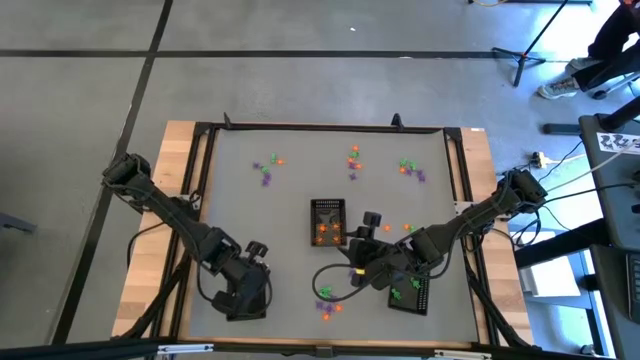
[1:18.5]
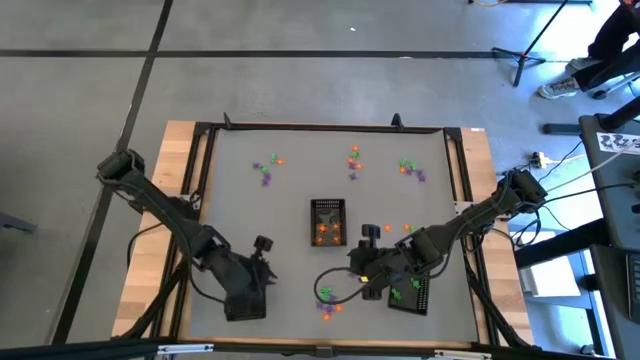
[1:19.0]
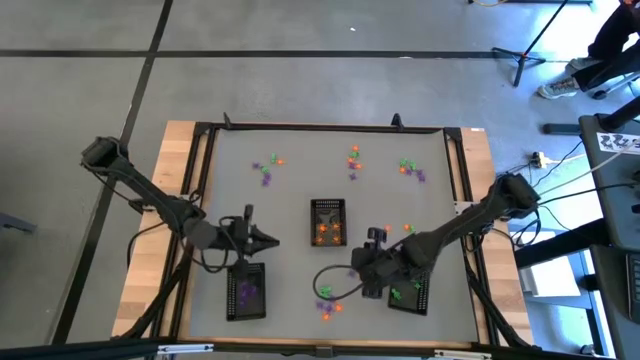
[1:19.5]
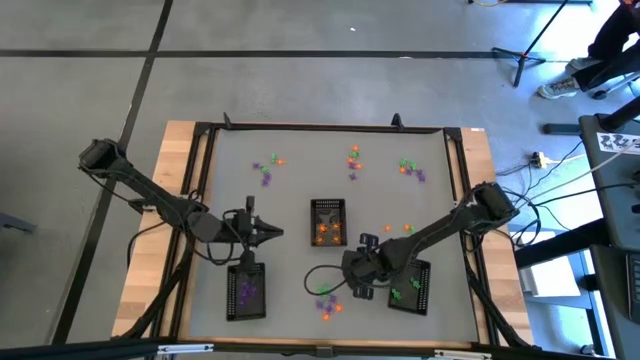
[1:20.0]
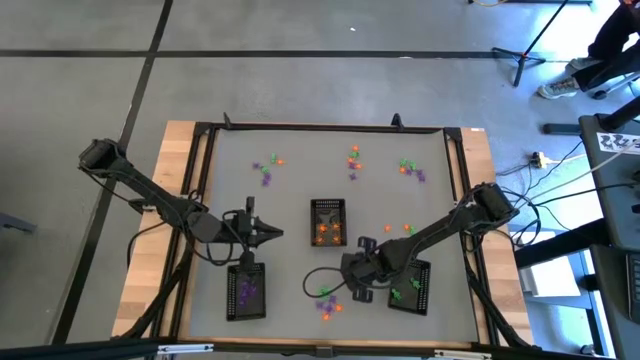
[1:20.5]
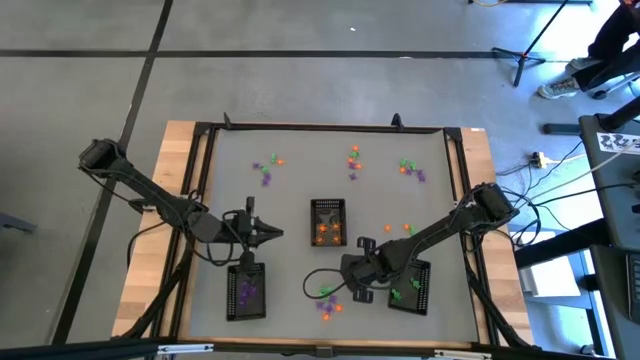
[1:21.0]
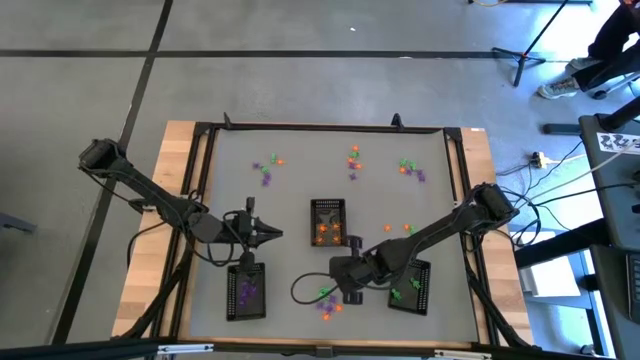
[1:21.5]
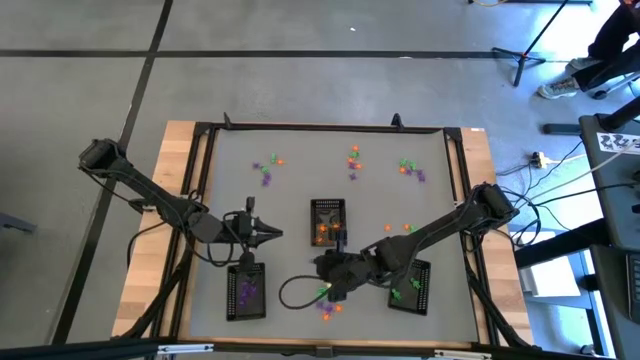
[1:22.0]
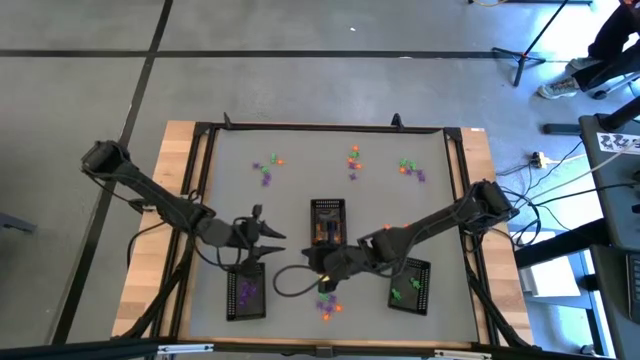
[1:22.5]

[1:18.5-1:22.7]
Task: Sort Halloween decoration
Put the violet spider toy into the bottom left black bin

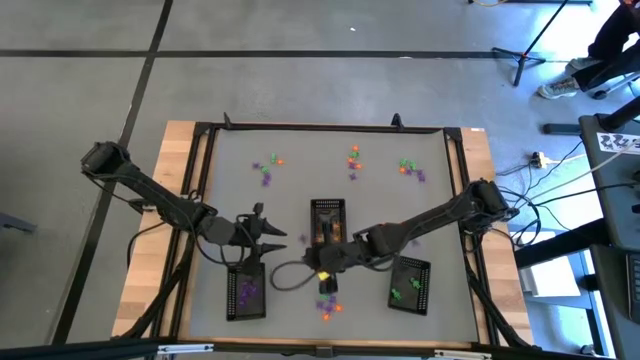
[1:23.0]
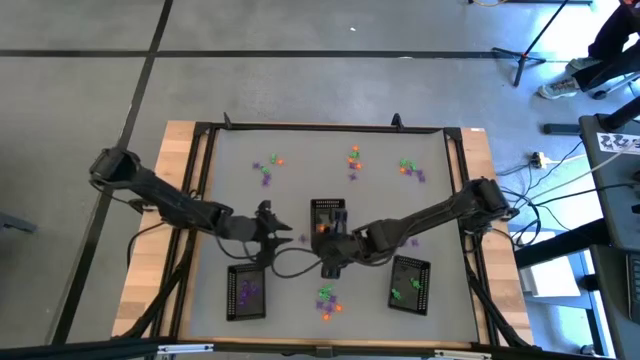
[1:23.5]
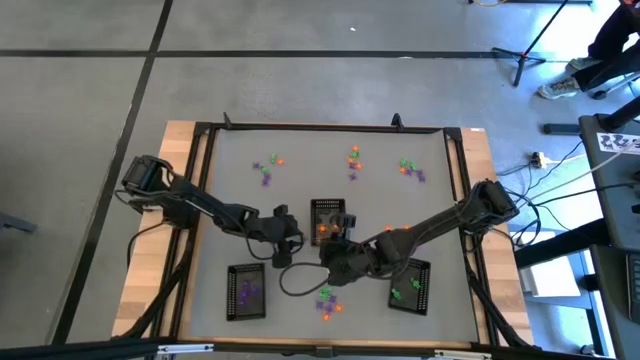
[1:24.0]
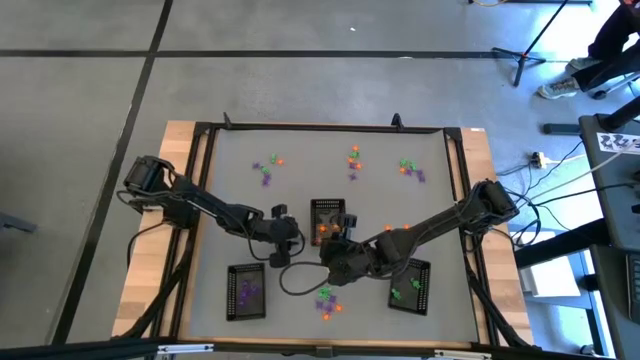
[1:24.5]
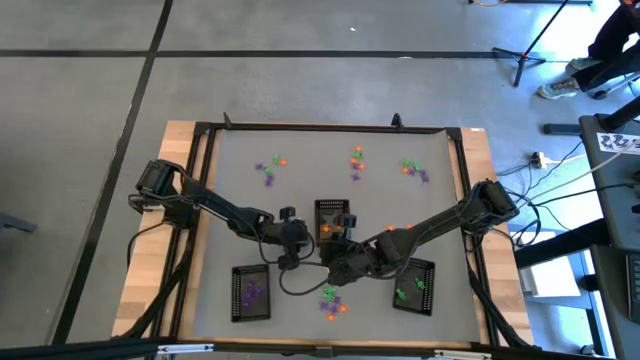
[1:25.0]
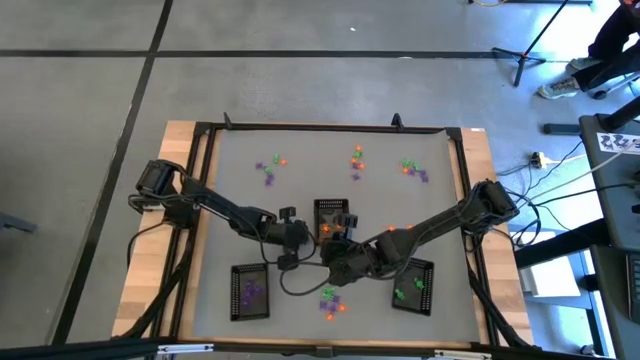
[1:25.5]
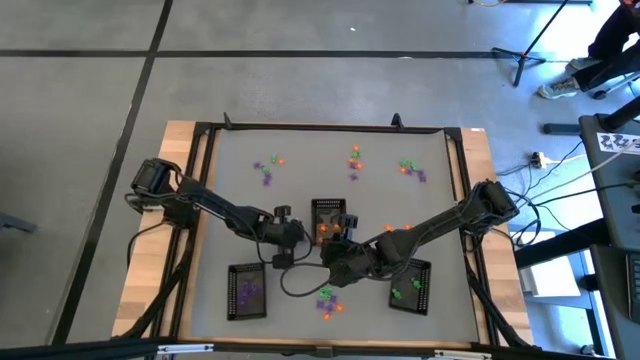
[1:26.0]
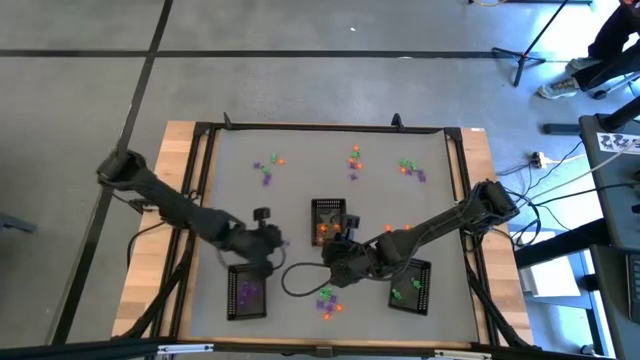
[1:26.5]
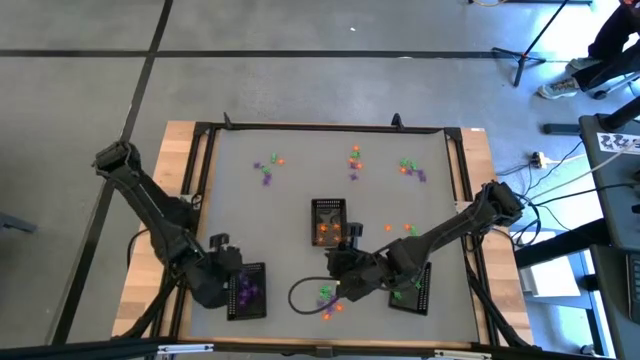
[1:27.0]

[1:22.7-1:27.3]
Put the violet spider toy into the bottom left black bin

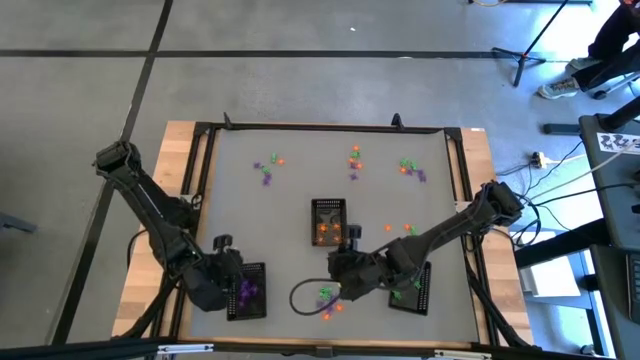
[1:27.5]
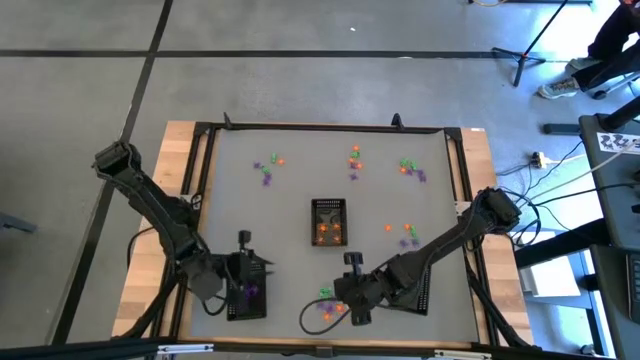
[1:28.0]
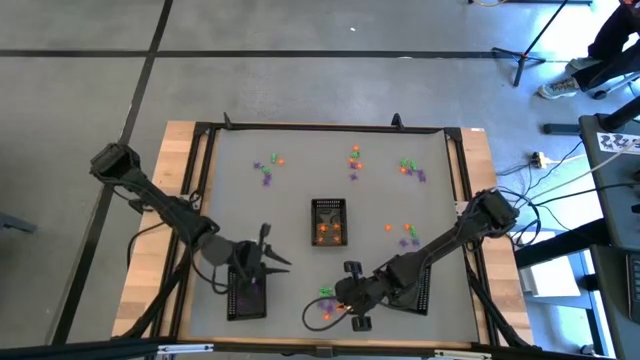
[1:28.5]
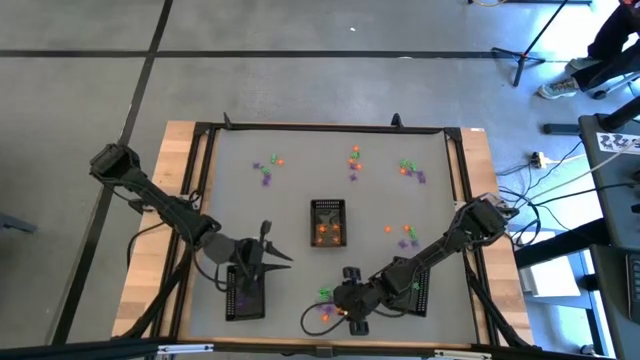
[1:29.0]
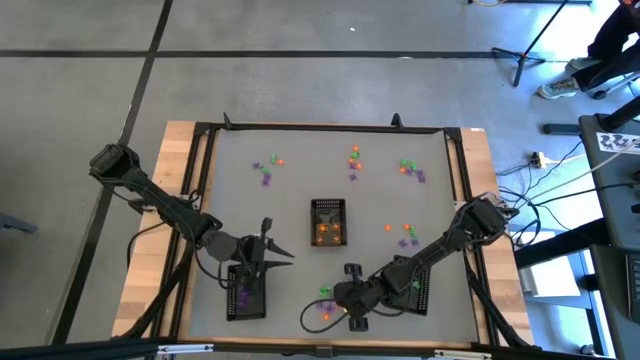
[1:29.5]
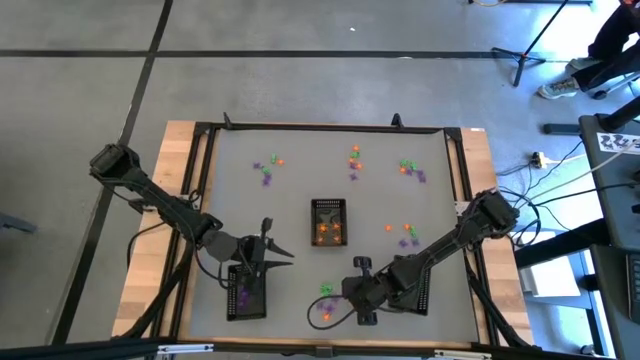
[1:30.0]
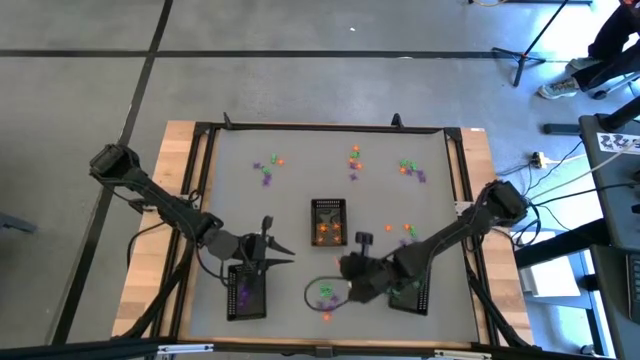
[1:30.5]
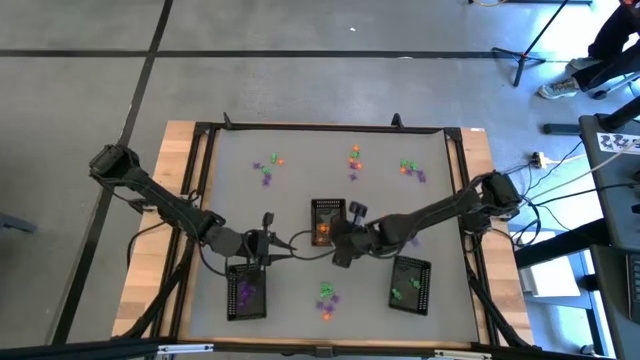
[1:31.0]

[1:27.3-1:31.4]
Put the orange spider toy into the top black bin

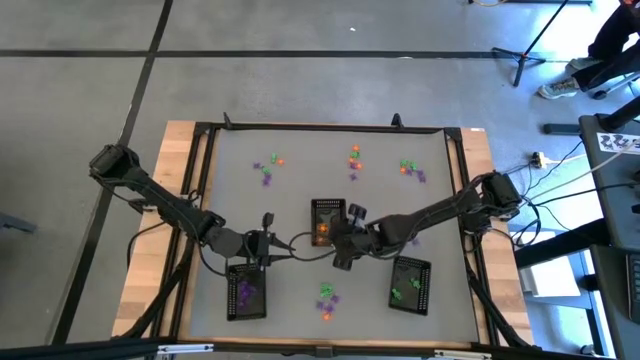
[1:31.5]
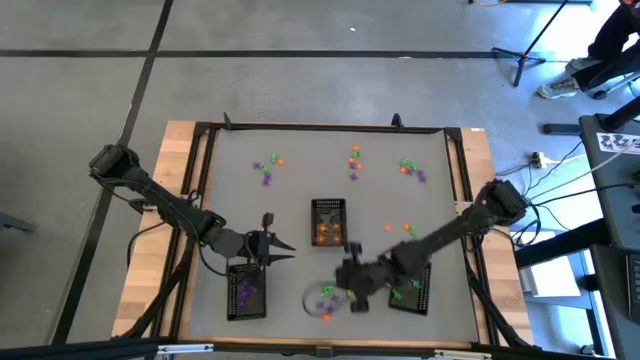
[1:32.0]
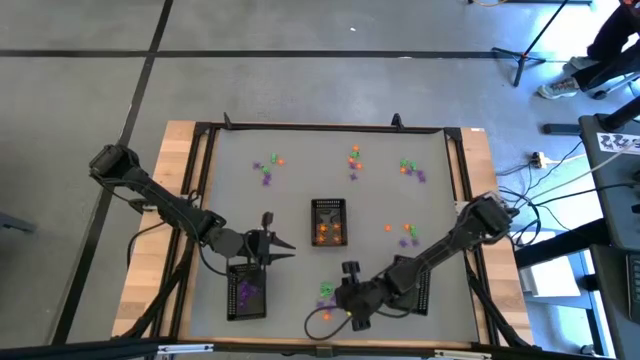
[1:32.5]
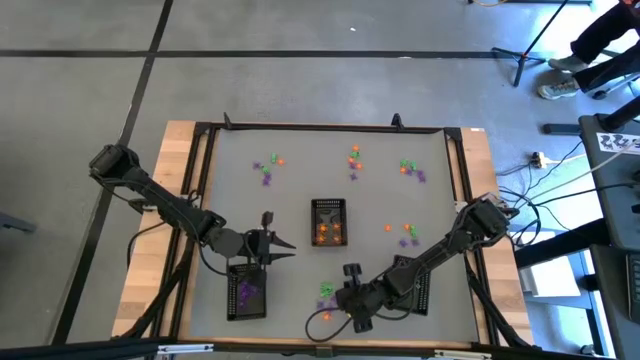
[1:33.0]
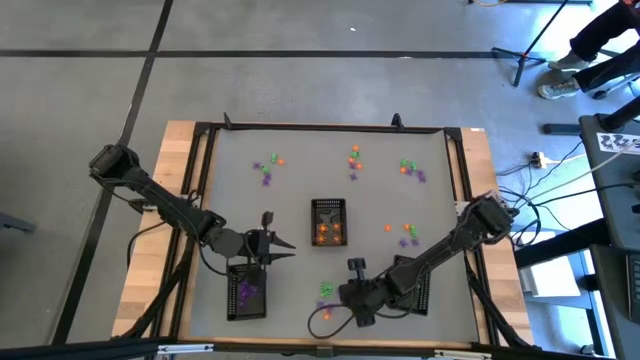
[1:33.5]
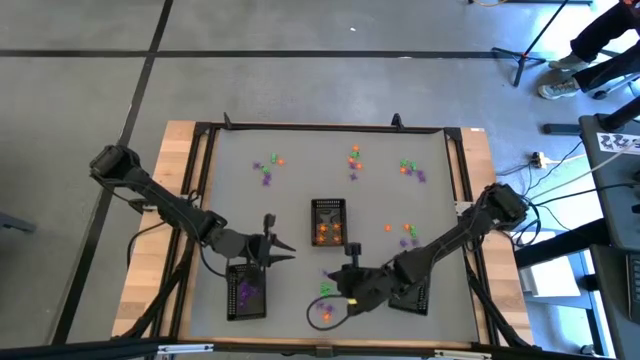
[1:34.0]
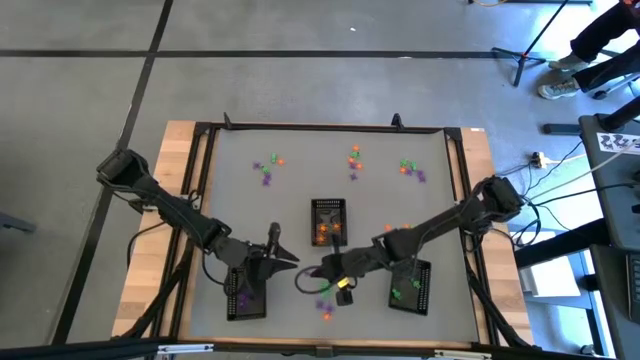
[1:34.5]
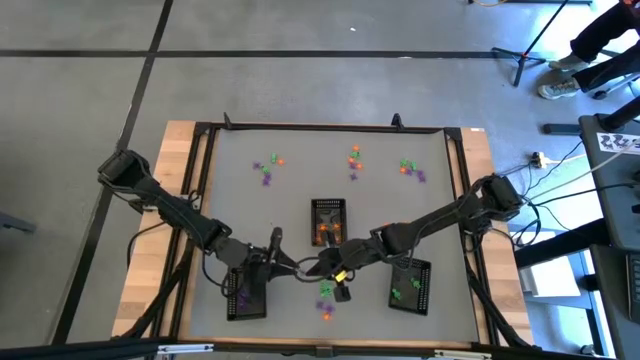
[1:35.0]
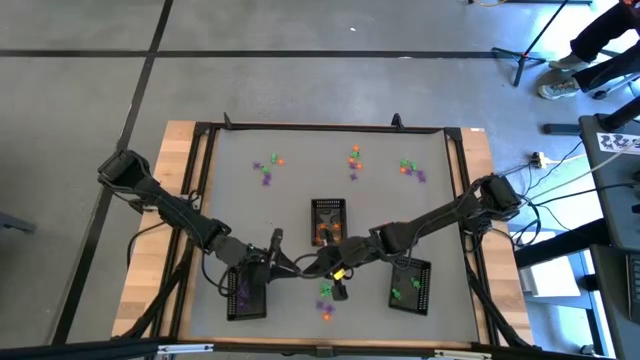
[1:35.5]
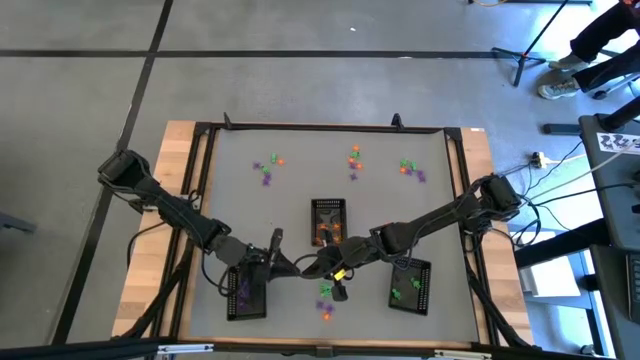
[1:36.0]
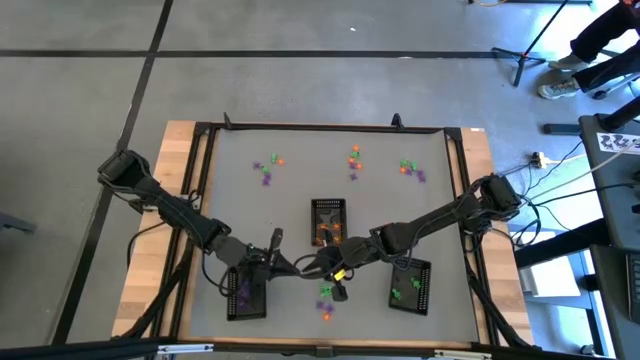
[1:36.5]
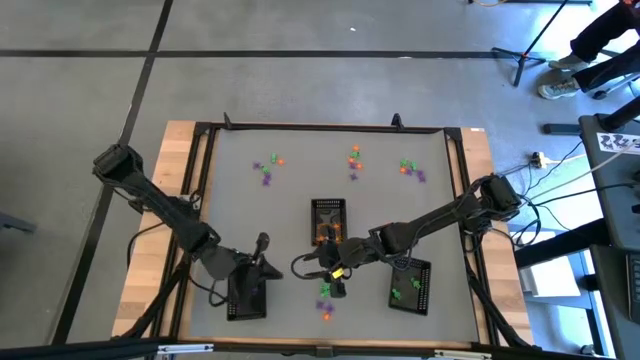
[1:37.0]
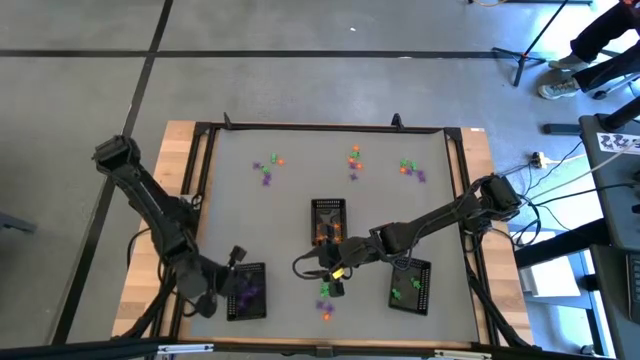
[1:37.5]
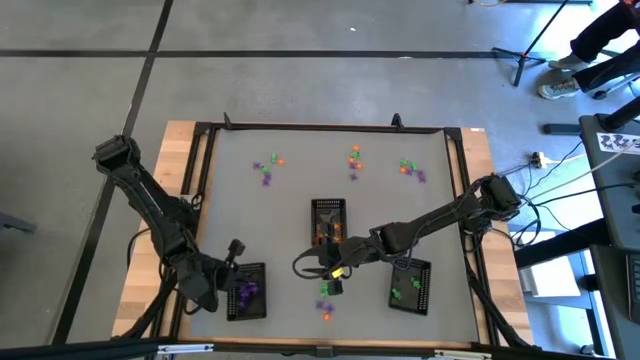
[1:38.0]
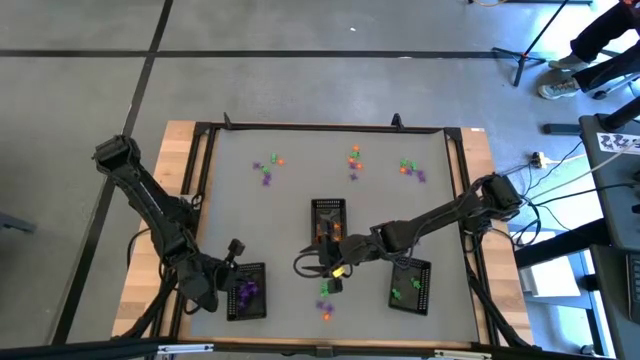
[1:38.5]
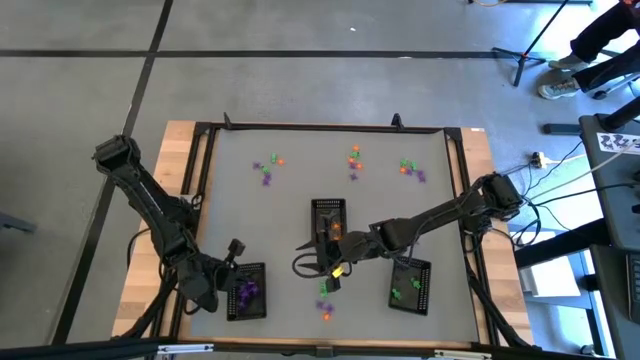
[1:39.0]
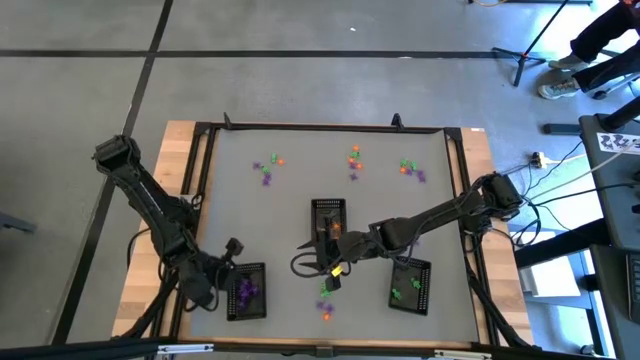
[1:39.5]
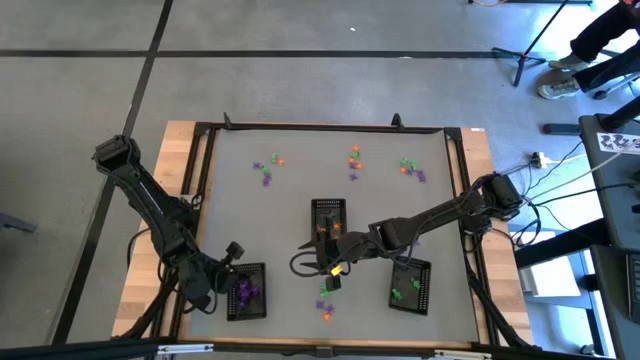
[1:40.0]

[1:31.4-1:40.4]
Put the violet spider toy into the bottom left black bin
